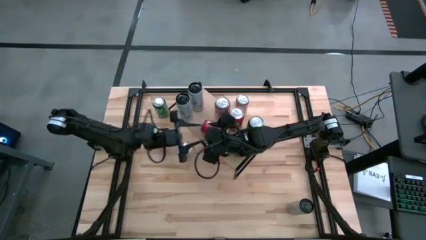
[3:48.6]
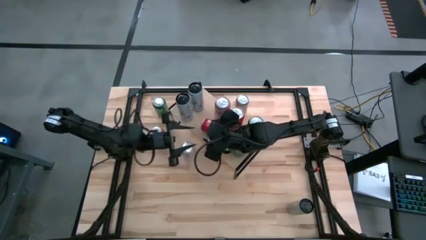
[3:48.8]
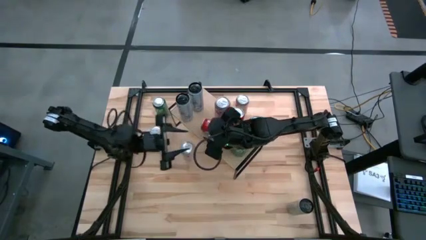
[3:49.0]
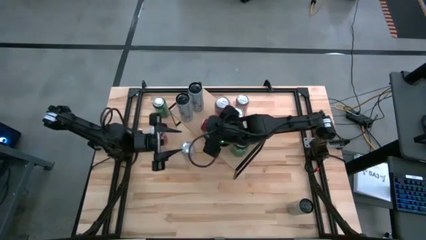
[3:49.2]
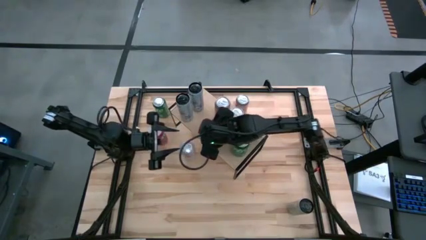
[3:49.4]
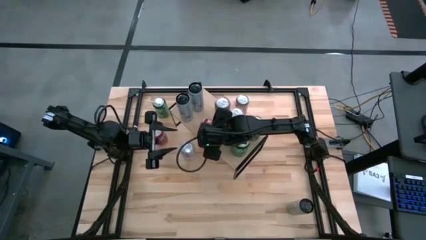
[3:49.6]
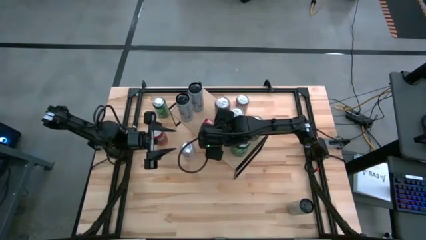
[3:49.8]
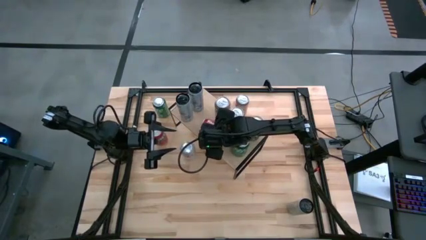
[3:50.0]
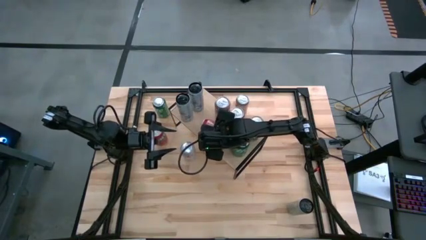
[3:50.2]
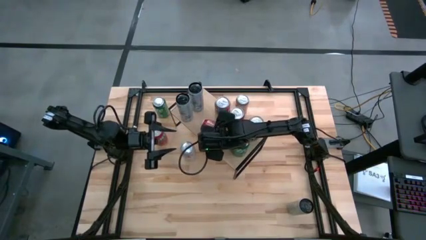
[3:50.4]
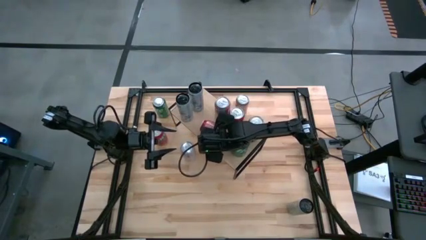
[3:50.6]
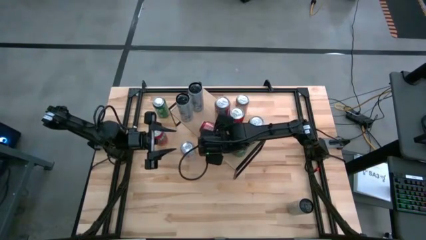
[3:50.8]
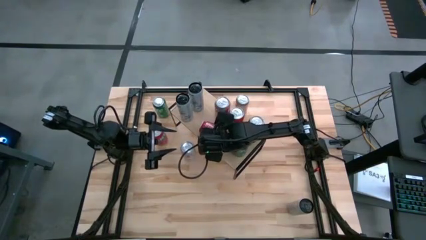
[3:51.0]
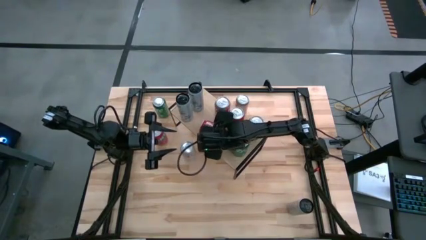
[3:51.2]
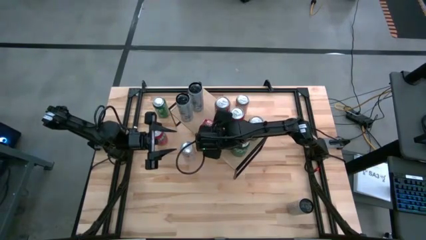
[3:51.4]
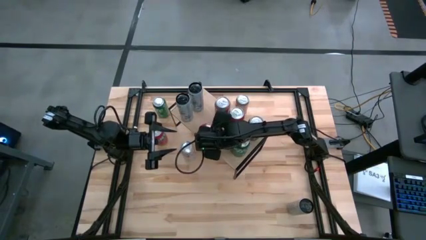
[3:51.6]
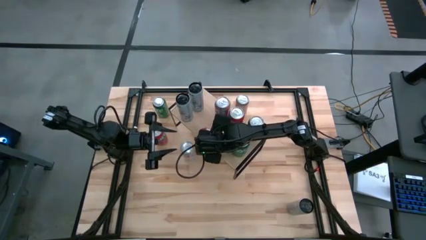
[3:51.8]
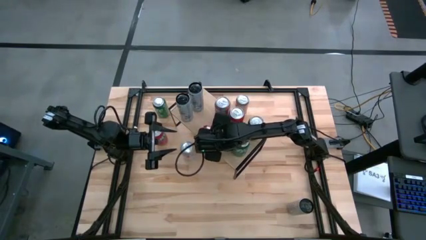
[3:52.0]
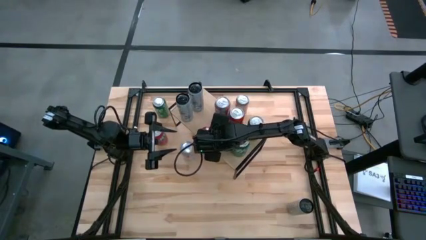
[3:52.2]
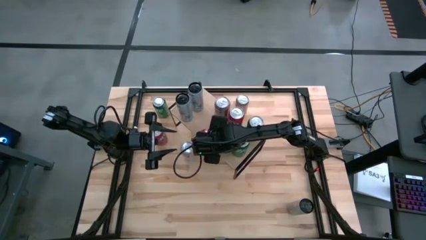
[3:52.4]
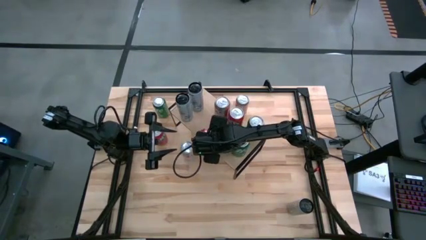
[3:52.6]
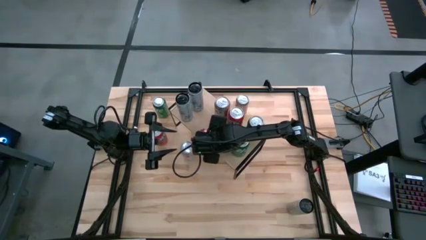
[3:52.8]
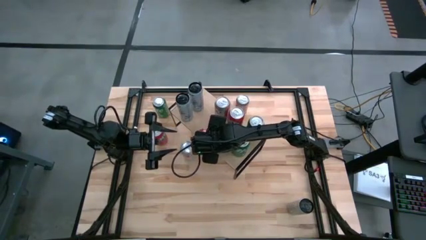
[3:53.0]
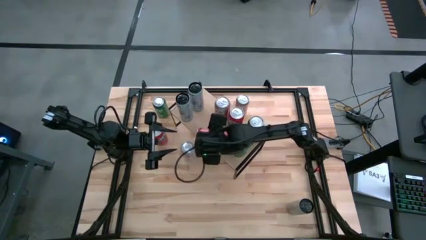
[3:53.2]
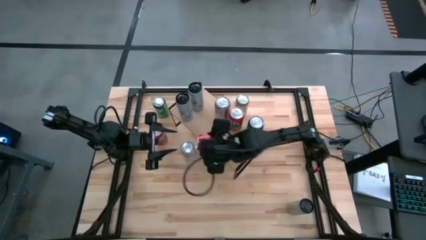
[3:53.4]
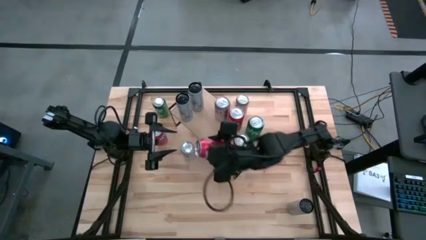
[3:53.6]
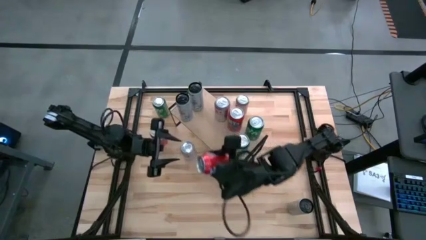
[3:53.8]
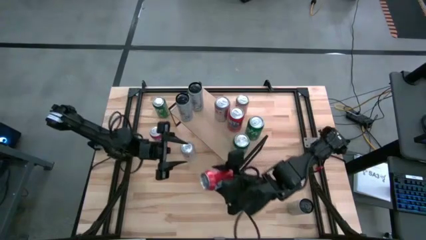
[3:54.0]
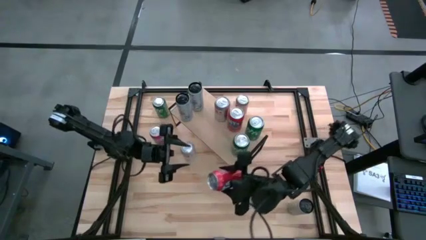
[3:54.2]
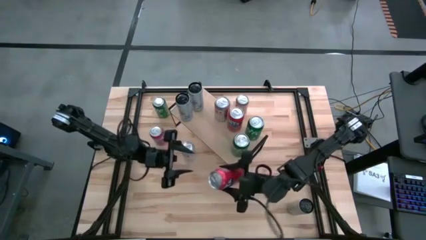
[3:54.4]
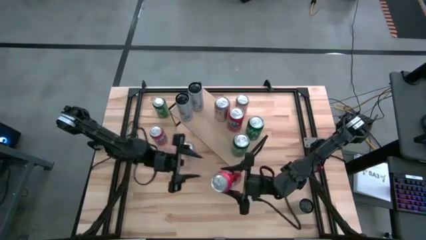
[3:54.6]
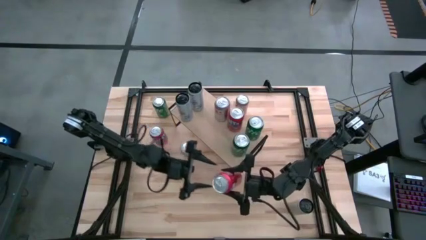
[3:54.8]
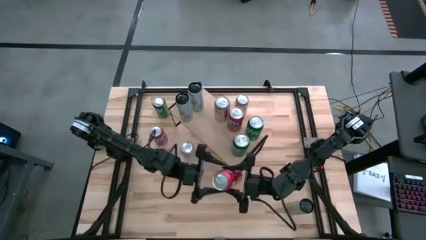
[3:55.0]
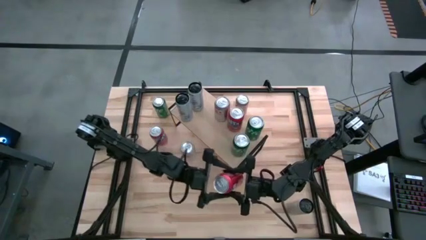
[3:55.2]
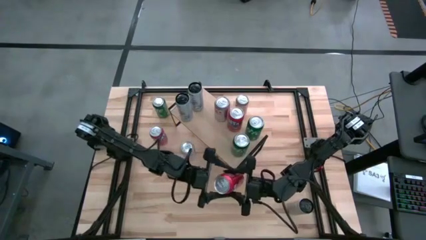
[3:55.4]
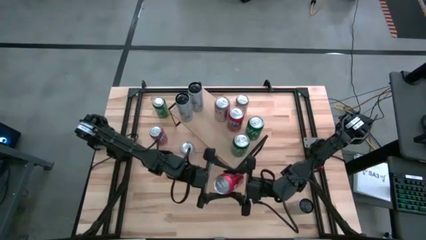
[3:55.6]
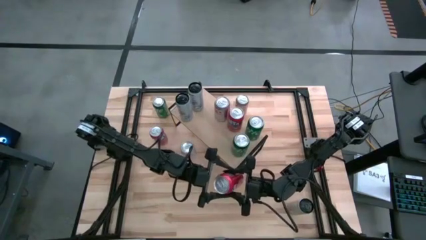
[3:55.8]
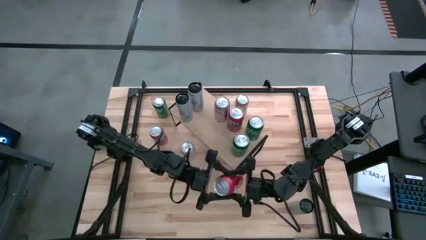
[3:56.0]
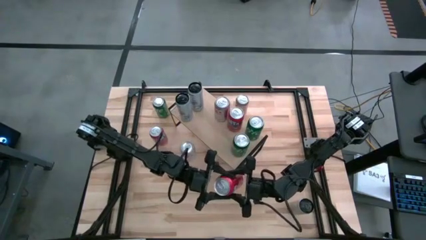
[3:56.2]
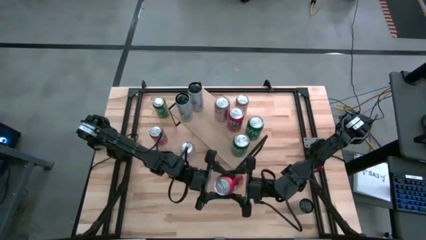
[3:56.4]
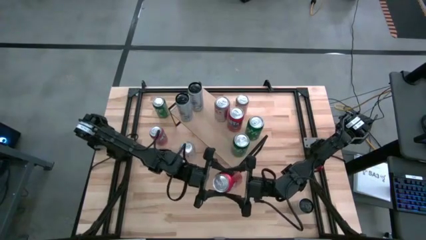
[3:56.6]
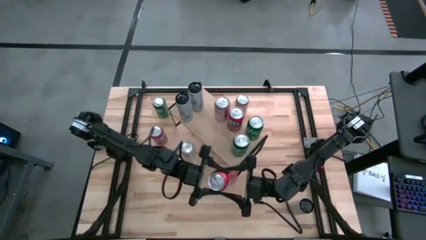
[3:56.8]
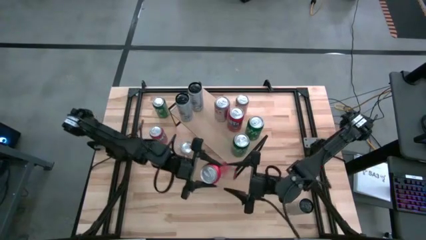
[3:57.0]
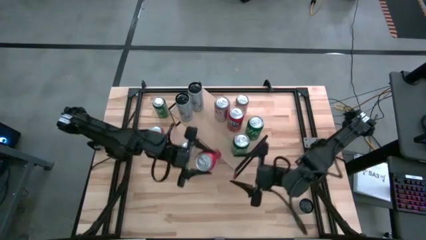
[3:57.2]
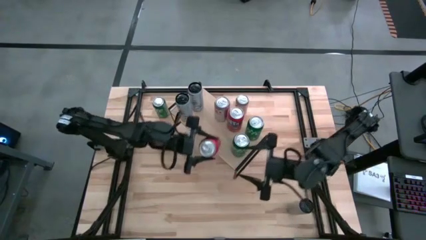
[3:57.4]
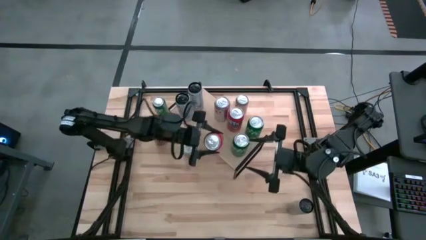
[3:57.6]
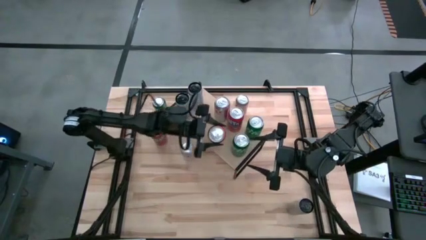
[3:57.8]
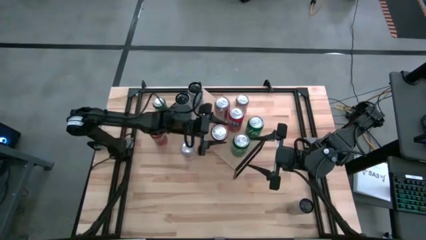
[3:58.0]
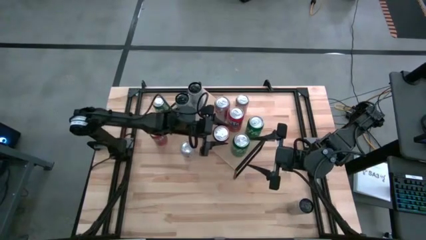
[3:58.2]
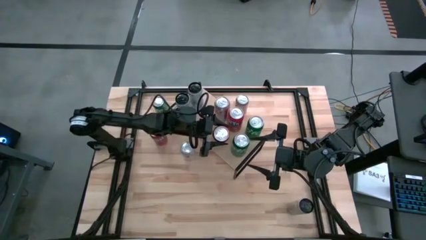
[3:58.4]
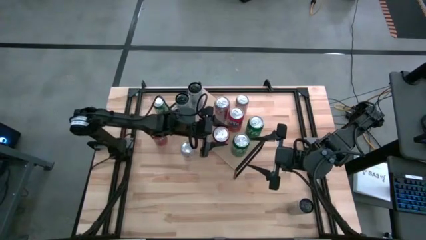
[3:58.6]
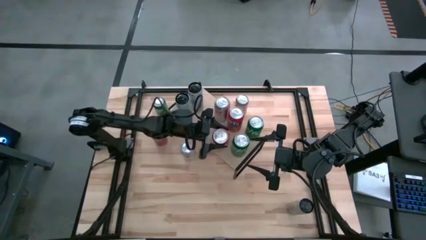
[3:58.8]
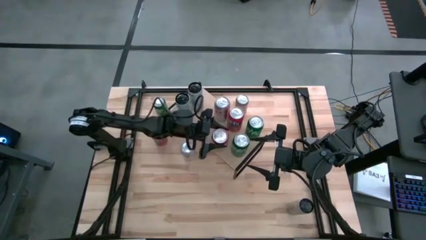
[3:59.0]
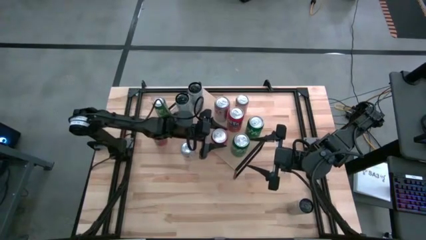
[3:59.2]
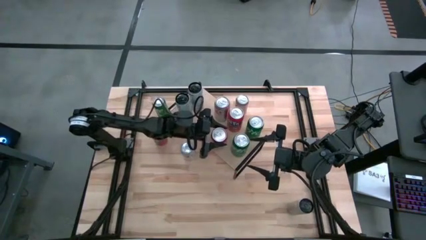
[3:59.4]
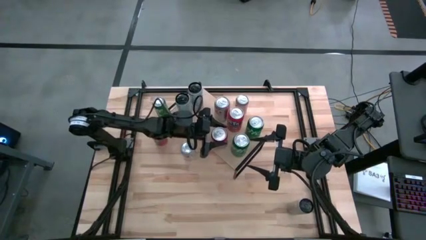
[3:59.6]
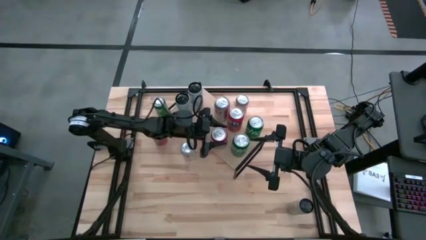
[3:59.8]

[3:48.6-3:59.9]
Task: Place canned beverage on shelf
Put the right orange soda can on the shelf aligned with the other orange soda can

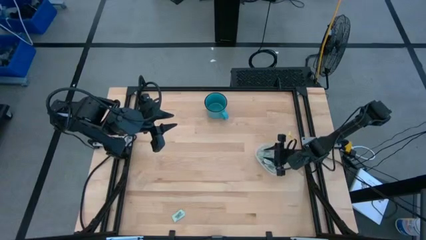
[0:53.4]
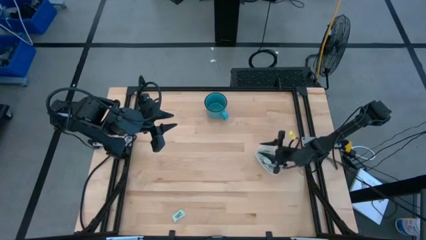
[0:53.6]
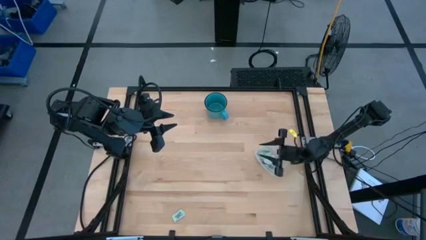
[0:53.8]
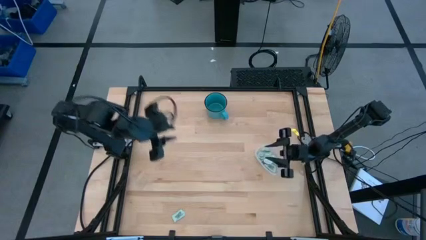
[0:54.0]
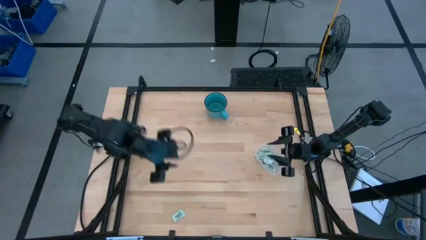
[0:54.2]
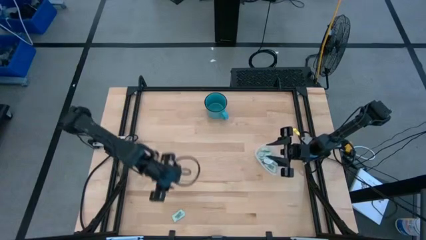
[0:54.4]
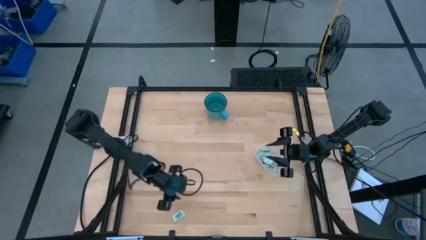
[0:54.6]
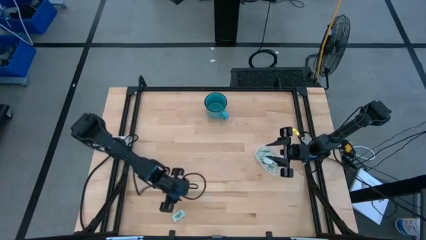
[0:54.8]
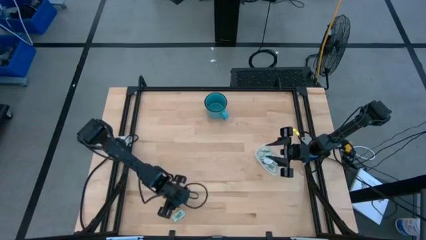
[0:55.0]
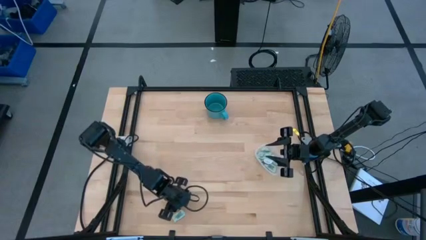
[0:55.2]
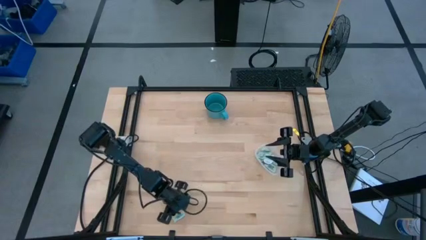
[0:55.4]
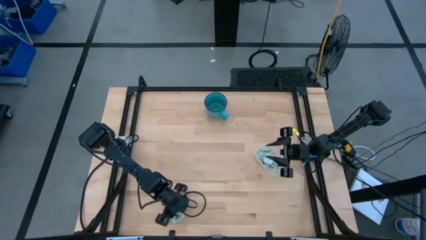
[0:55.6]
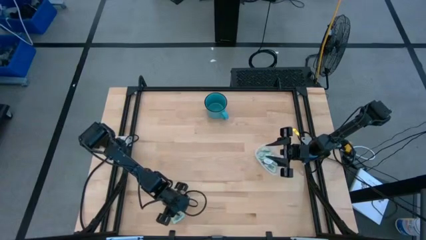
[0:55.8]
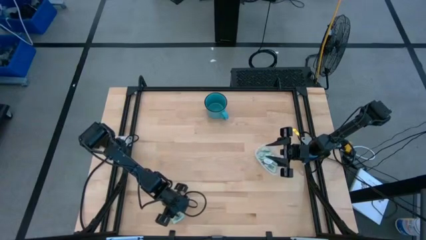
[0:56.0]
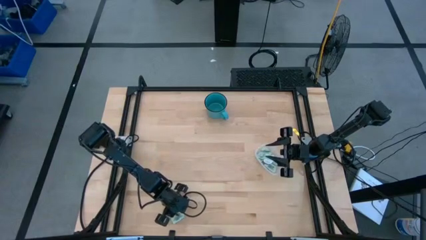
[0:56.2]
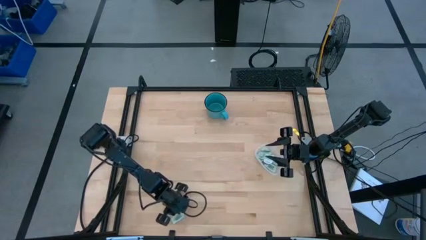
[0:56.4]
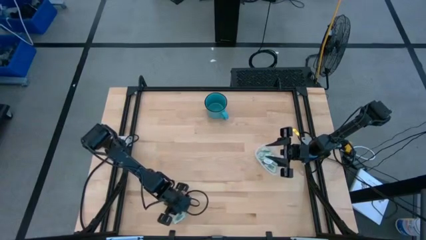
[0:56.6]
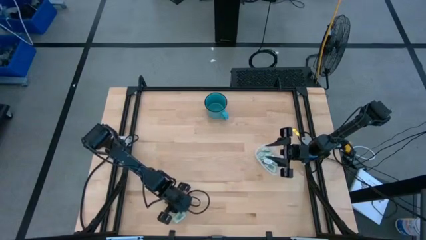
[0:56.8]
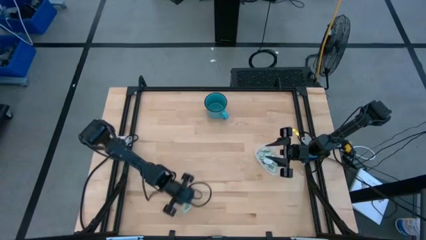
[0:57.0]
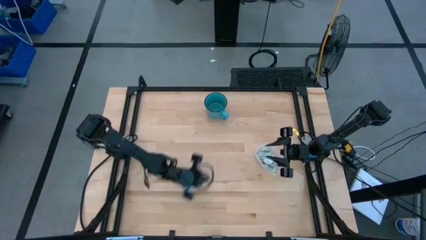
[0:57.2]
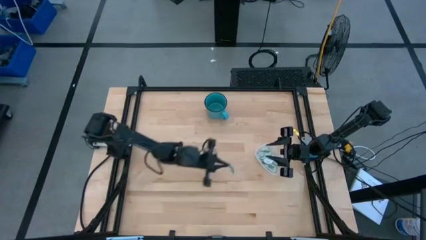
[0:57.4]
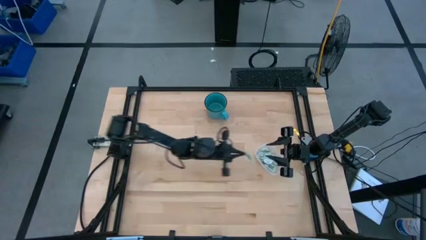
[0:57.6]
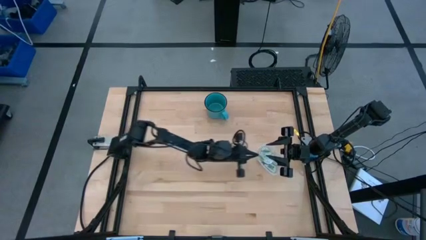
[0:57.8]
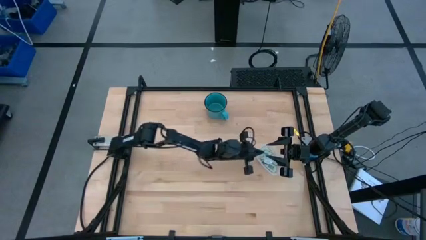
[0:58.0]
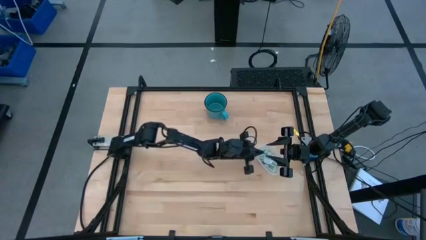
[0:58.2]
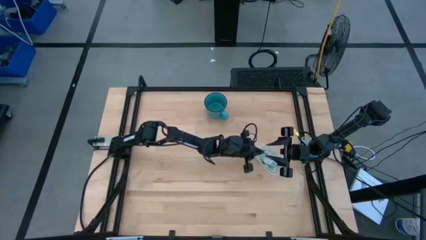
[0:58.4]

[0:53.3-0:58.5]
Task: Pick and place Stevia / Truvia into bins
Put the white stevia packet into the transparent container

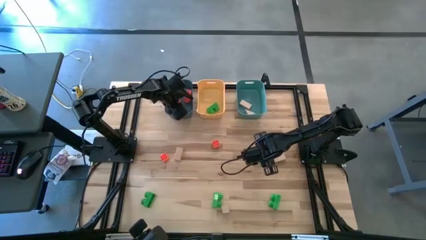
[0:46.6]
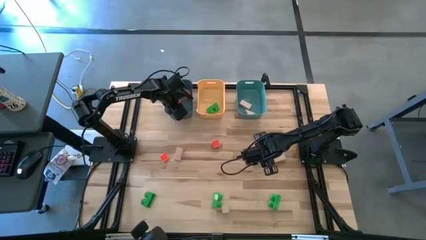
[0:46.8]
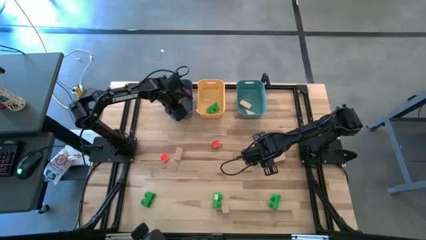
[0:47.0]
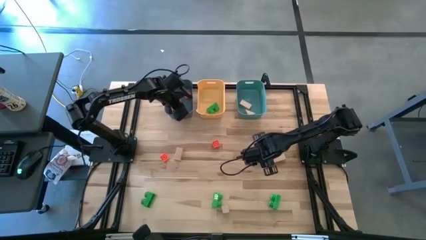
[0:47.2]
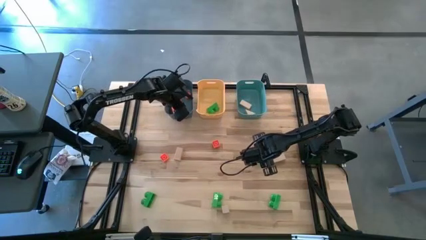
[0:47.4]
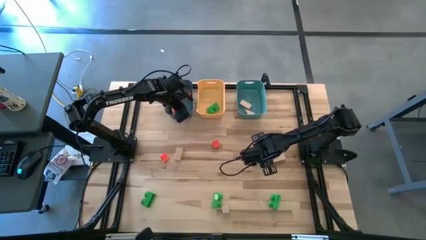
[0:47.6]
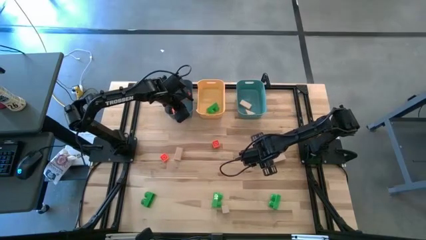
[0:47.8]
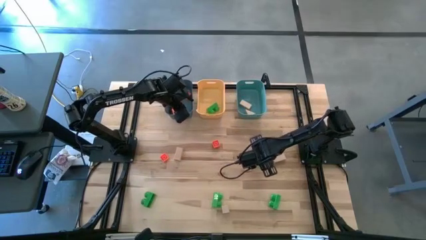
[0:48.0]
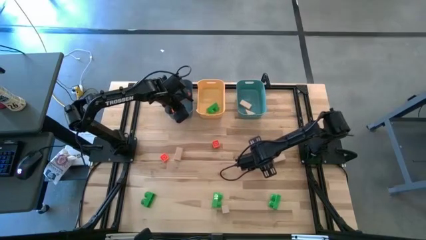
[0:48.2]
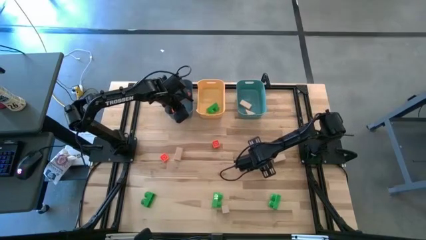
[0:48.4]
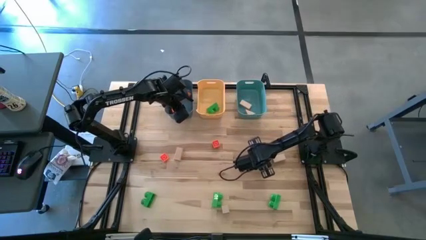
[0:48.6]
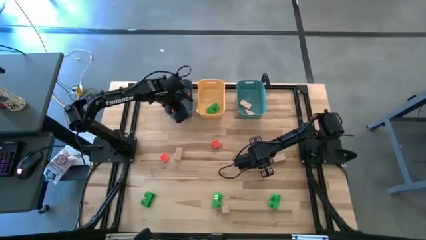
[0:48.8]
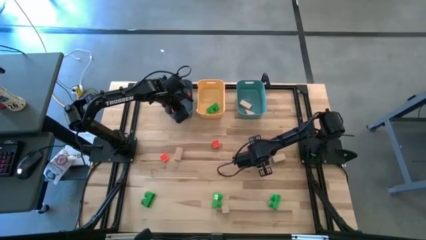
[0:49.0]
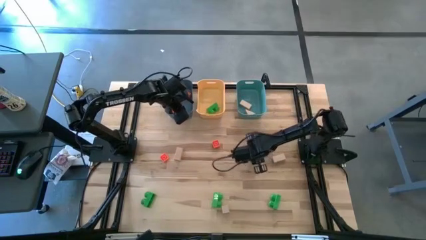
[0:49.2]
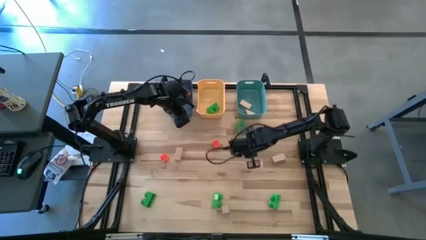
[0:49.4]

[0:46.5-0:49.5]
Task: Sort & place blocks by color
Put the green game piece into the yellow bin
